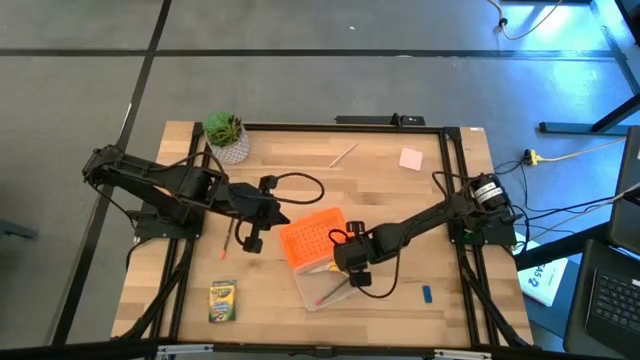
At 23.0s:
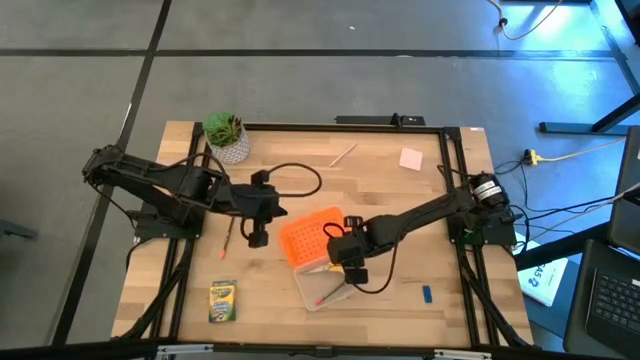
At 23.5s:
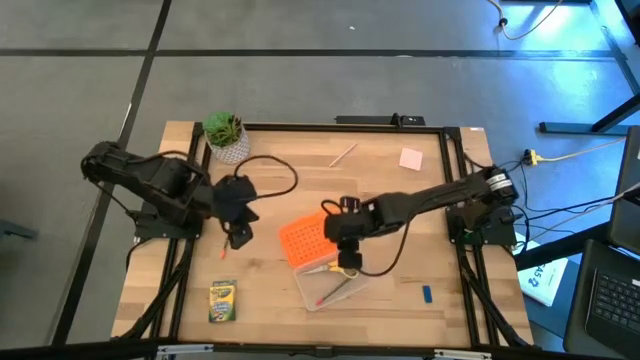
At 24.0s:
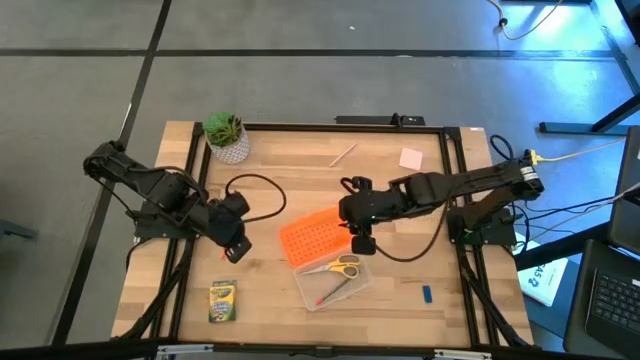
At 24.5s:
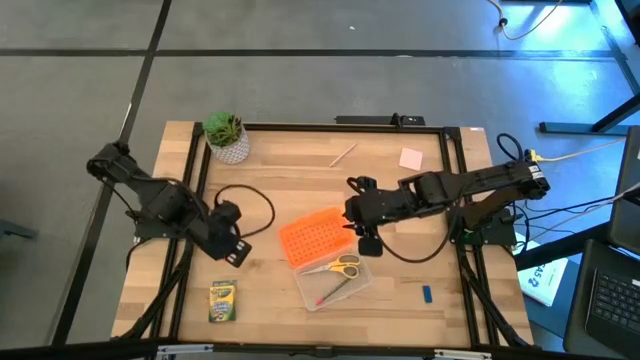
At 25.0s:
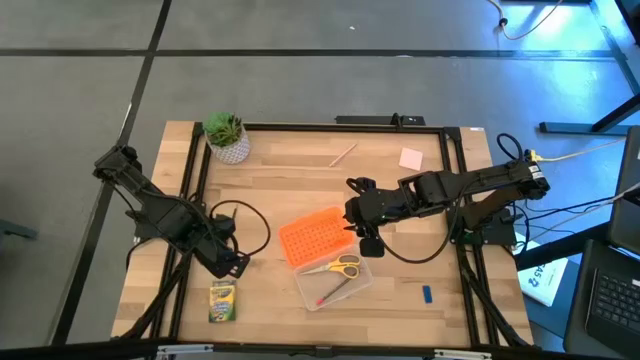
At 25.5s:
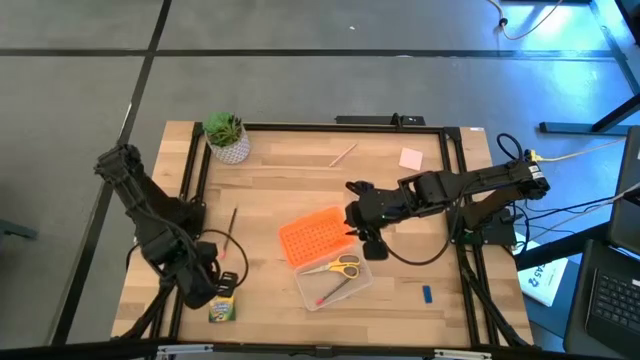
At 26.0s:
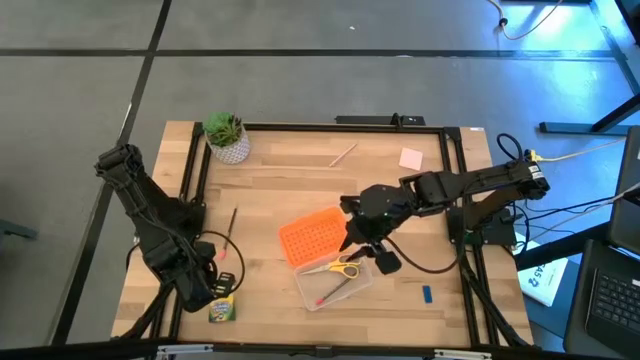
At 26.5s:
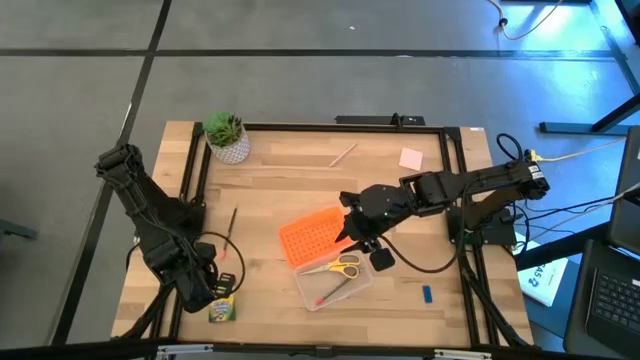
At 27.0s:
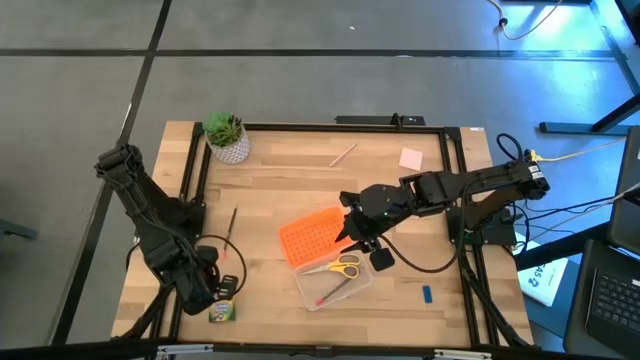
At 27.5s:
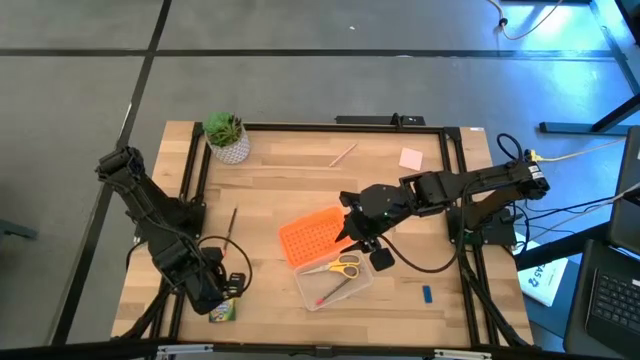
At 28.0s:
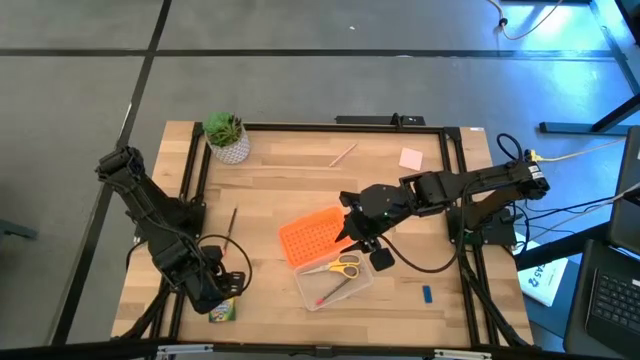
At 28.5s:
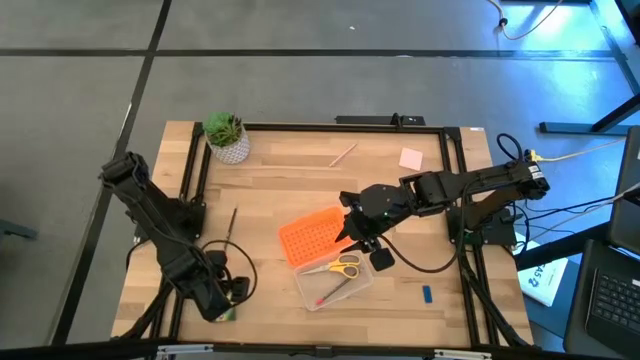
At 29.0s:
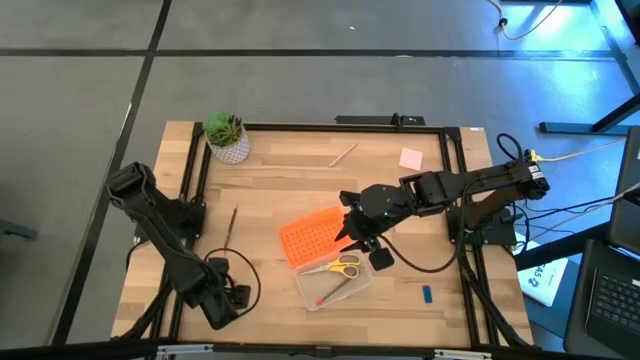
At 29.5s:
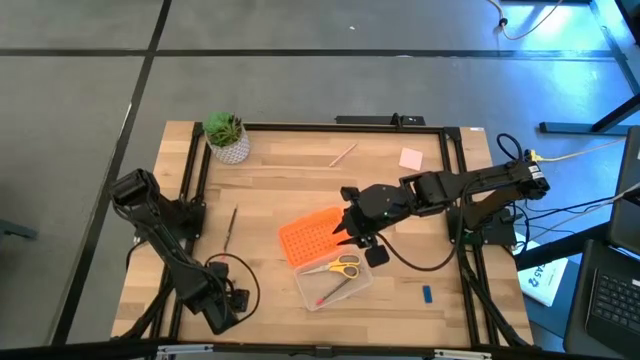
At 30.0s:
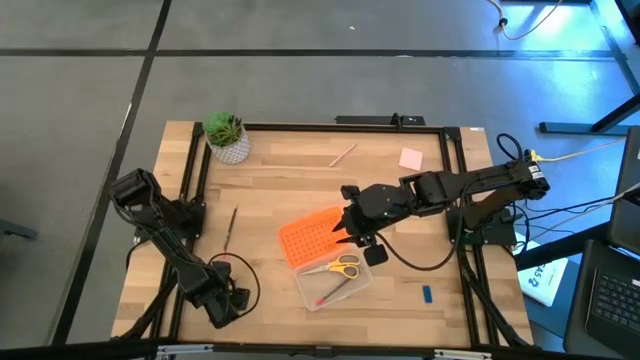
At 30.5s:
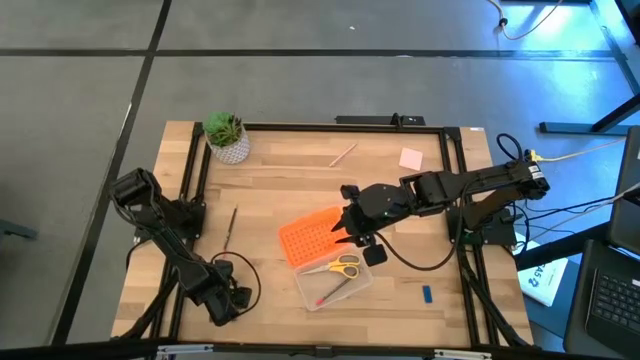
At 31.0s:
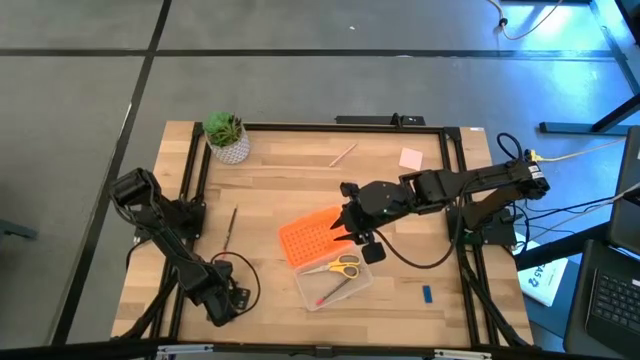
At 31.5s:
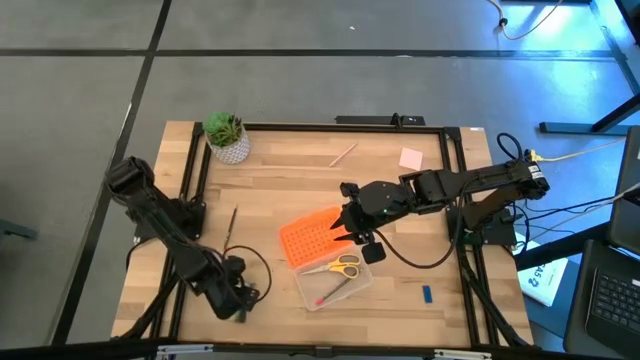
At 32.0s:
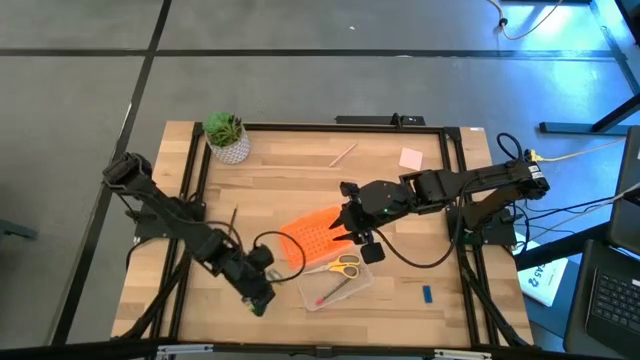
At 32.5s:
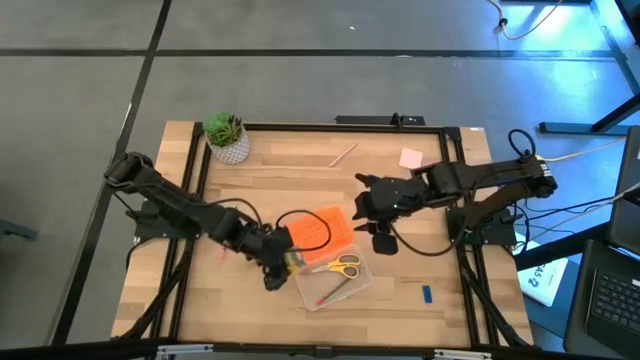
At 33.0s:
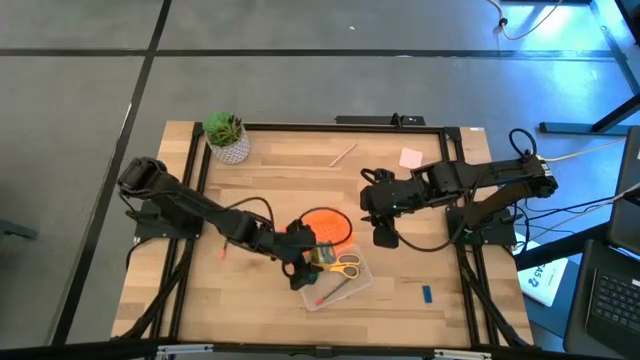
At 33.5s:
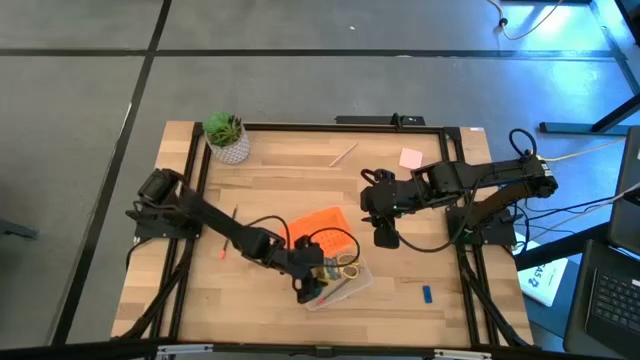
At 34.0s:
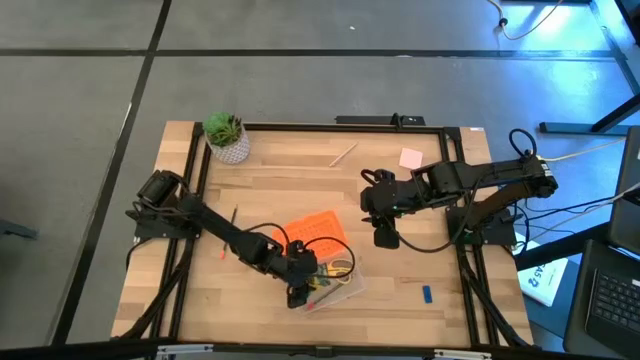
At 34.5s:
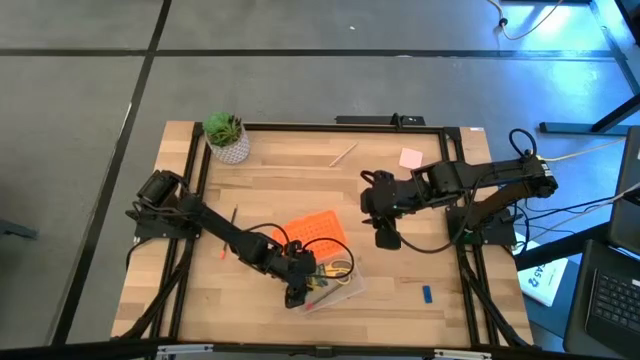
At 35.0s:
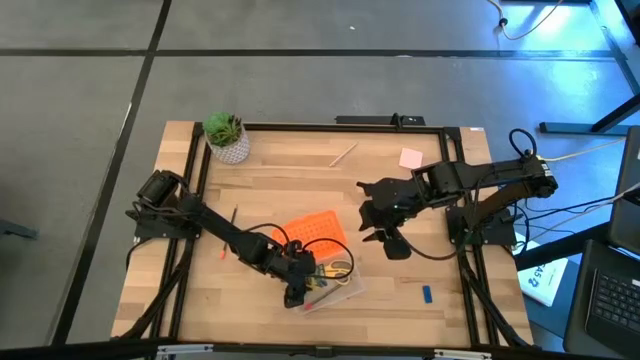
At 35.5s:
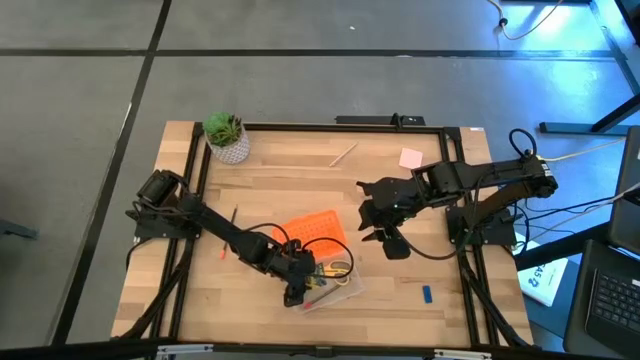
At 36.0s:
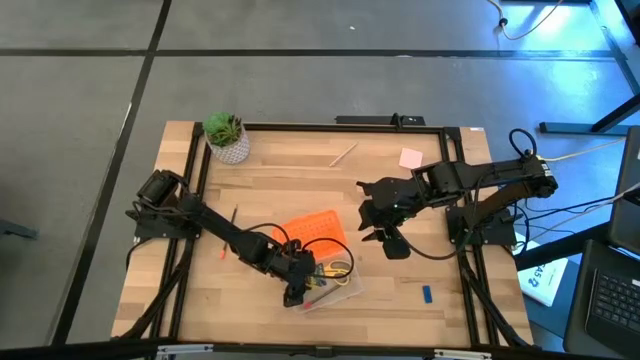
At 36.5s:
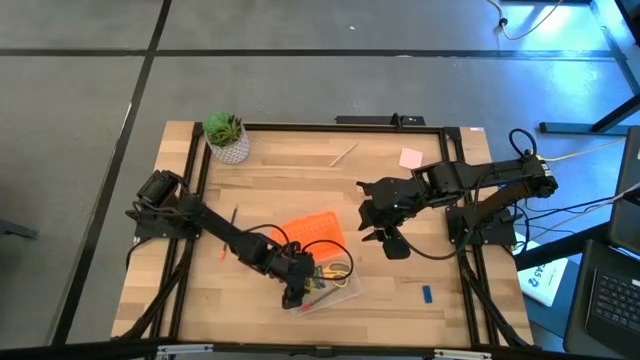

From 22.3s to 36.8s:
Task: Pack school essentials
Put the yellow crayon box into the orange supply box

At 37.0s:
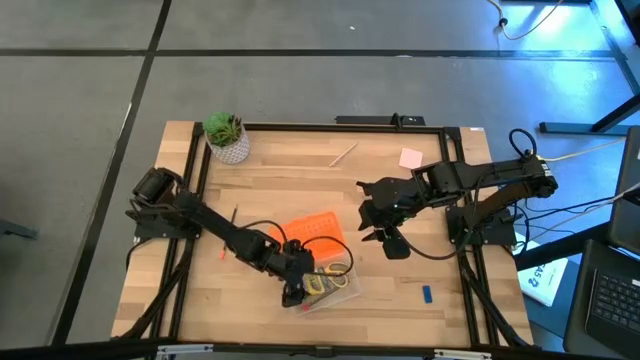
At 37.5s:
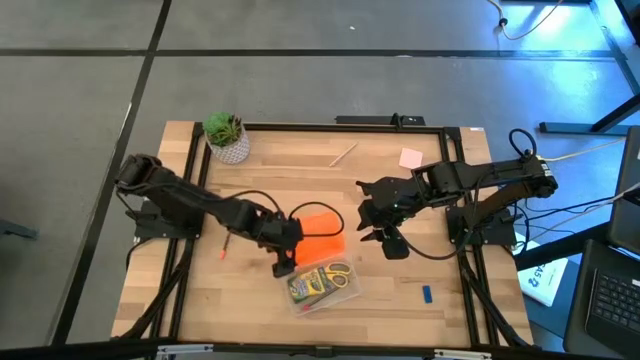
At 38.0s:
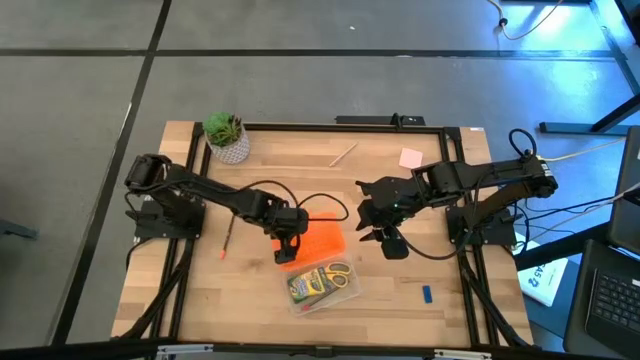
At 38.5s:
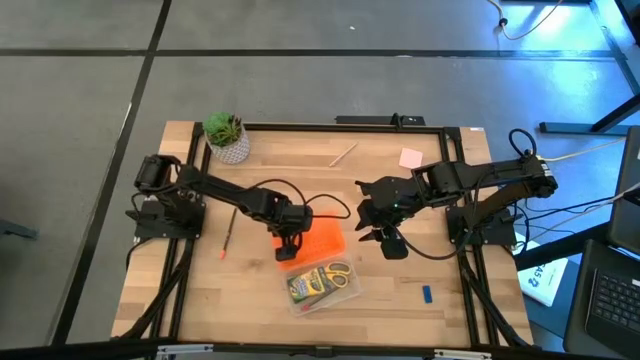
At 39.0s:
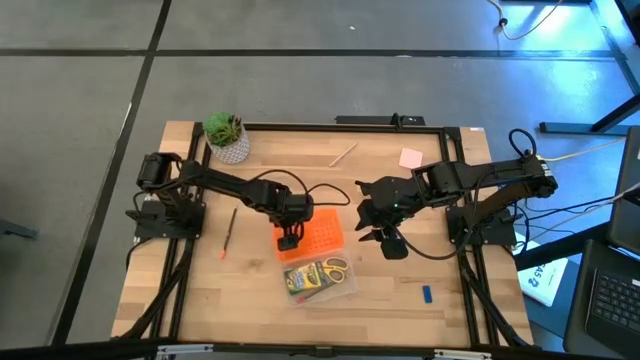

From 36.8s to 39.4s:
Adjust the orange supply box

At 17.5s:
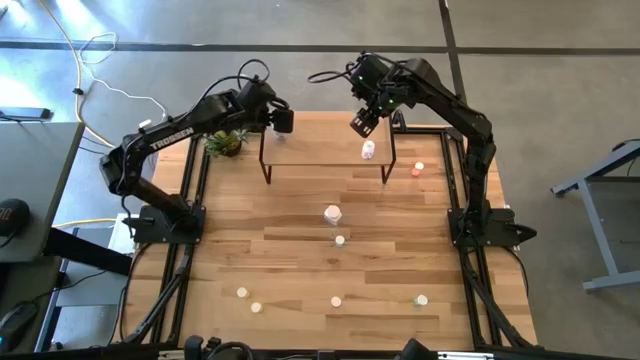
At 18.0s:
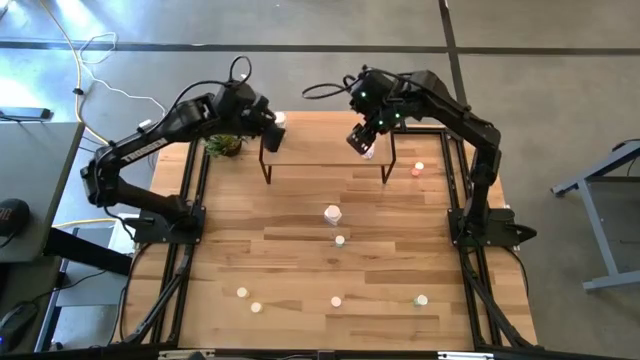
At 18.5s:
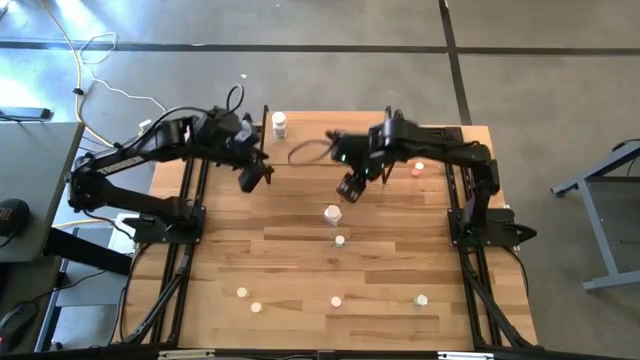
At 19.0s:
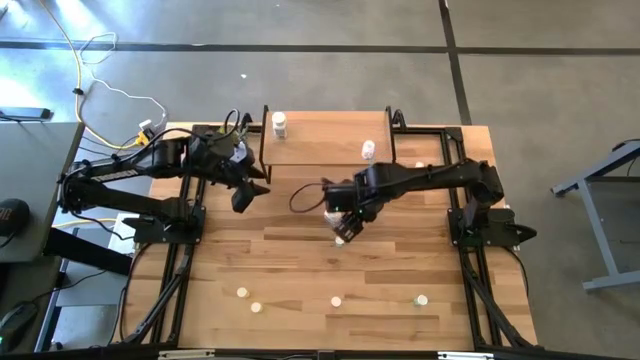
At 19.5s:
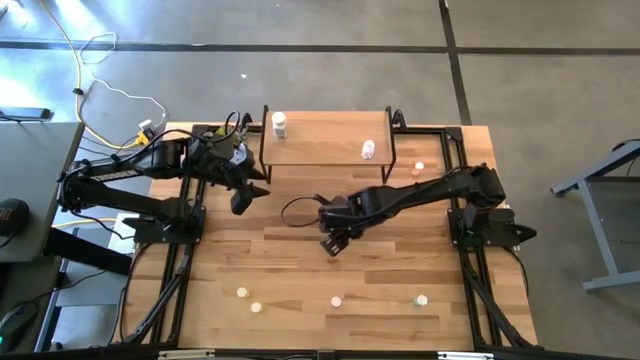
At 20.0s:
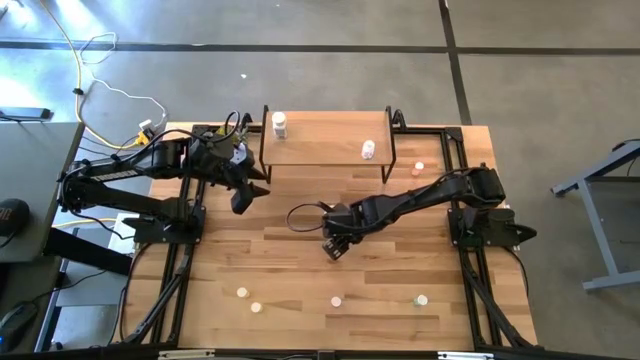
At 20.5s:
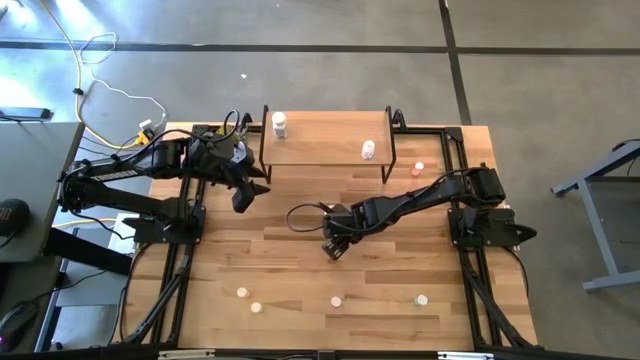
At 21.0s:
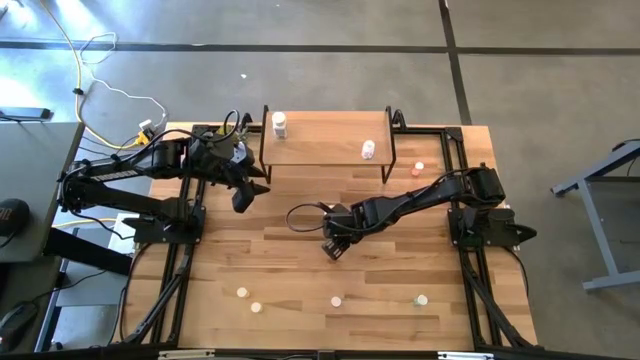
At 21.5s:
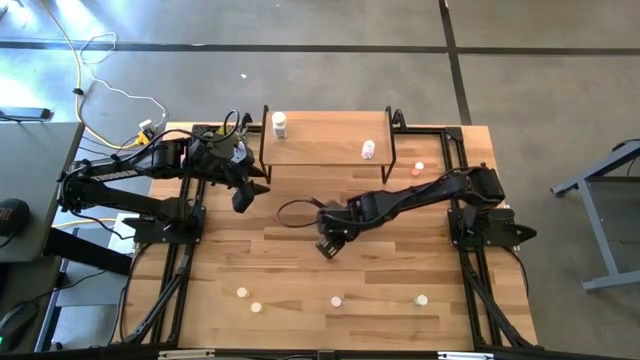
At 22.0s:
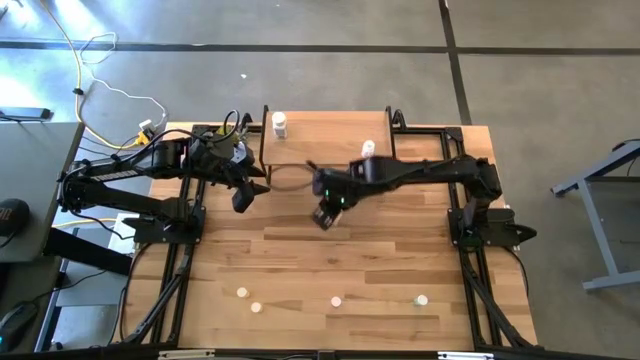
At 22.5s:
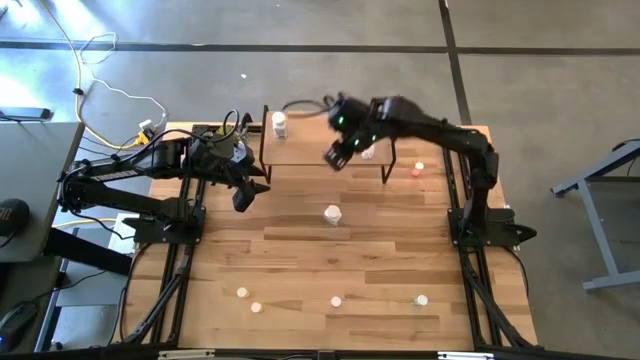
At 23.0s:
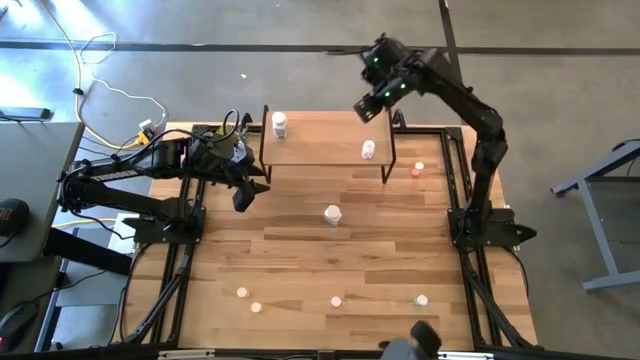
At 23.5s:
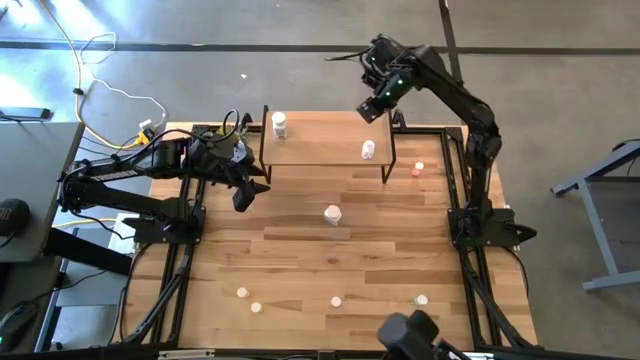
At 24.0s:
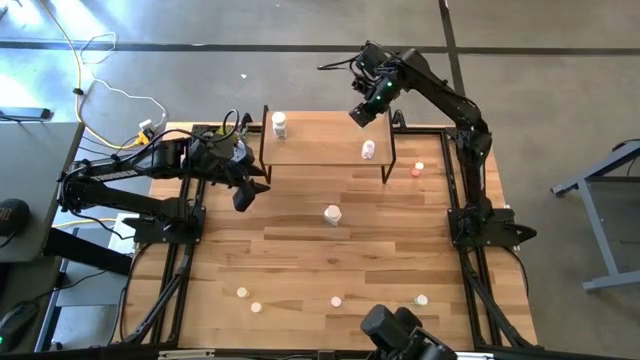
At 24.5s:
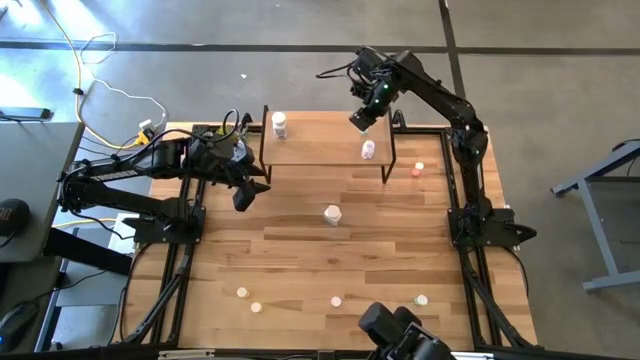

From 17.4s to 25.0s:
Task: Pick and place medicine bottles onto shelf by color
Put the top blue pill bottle on the shelf
